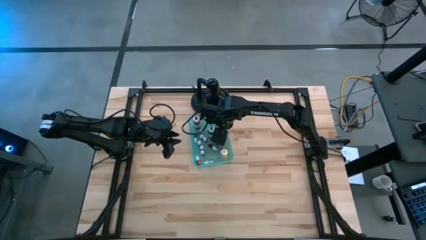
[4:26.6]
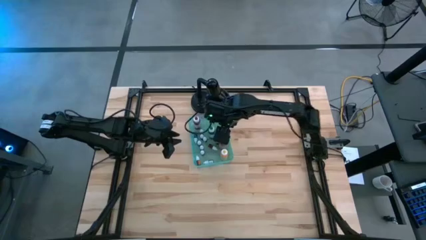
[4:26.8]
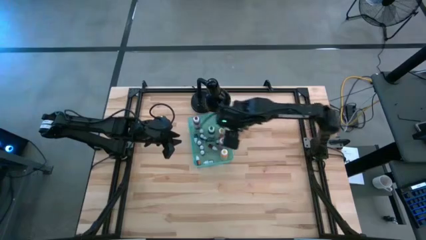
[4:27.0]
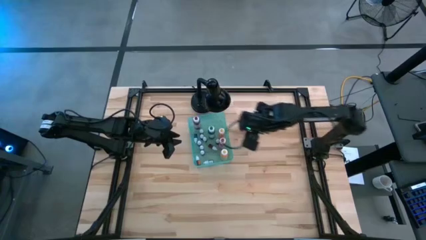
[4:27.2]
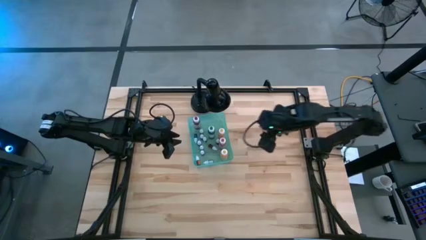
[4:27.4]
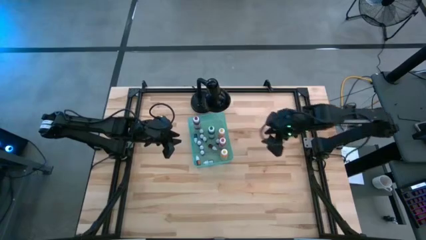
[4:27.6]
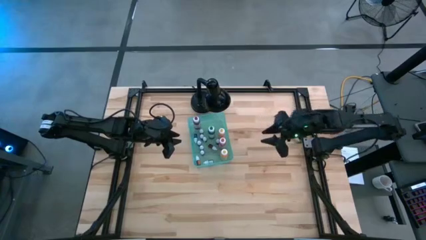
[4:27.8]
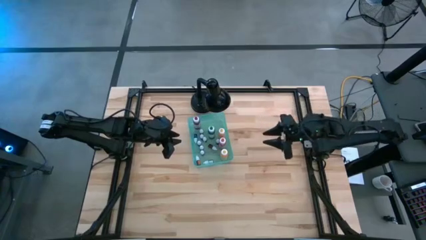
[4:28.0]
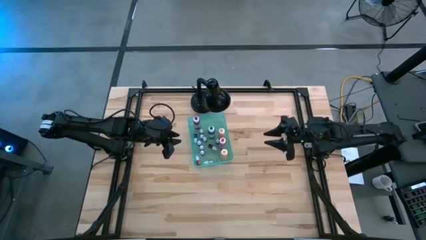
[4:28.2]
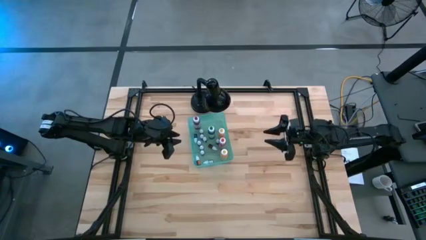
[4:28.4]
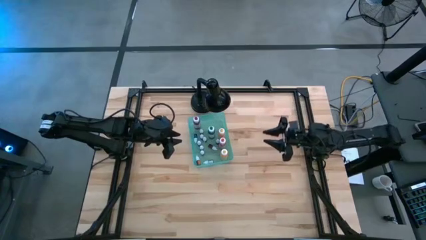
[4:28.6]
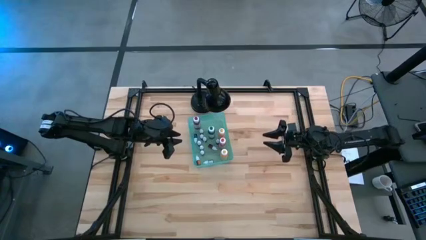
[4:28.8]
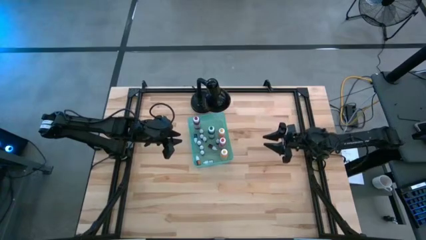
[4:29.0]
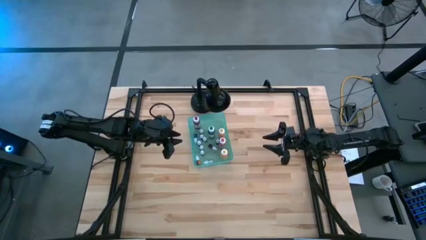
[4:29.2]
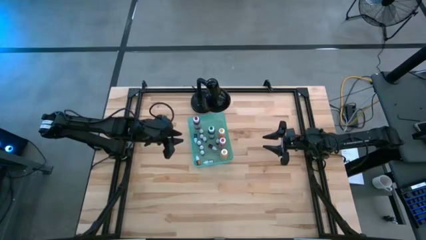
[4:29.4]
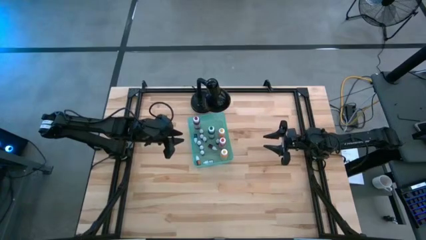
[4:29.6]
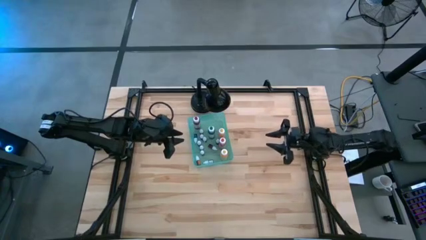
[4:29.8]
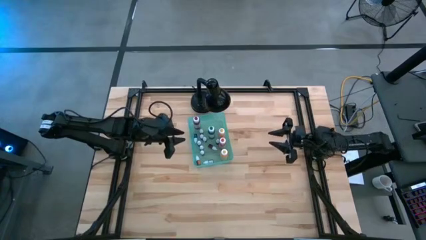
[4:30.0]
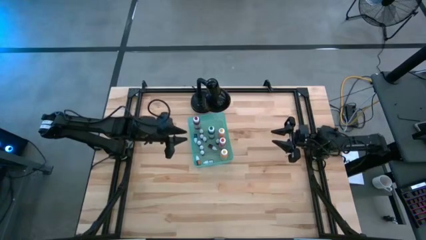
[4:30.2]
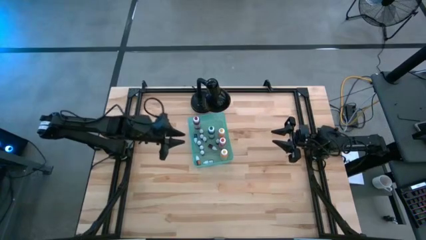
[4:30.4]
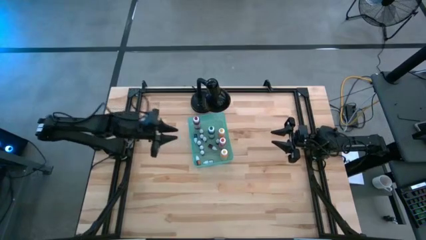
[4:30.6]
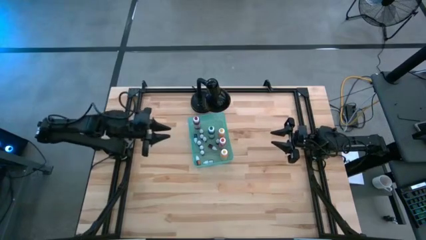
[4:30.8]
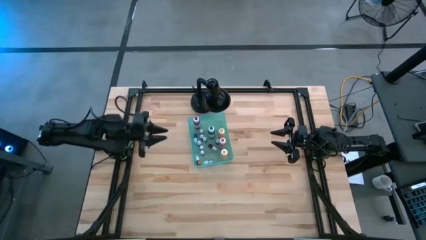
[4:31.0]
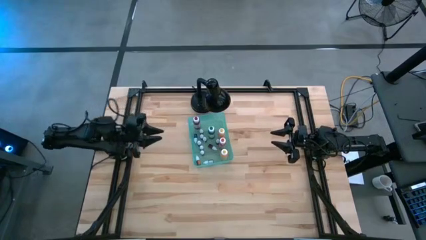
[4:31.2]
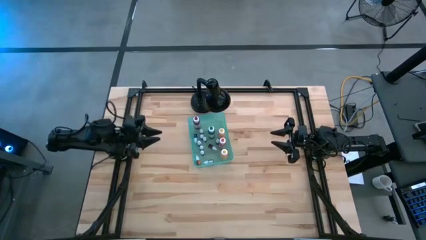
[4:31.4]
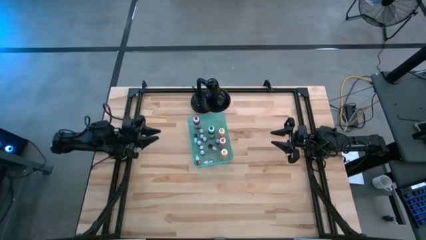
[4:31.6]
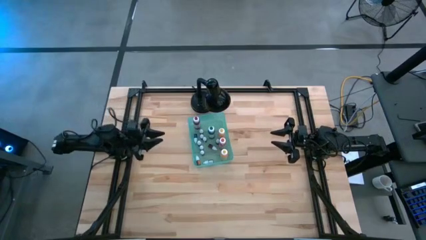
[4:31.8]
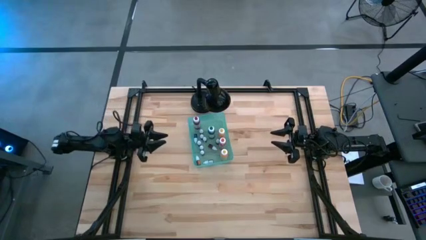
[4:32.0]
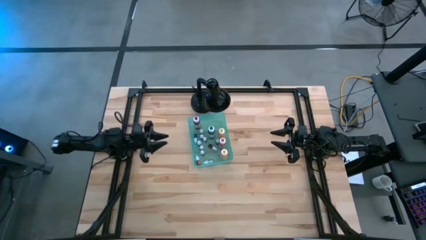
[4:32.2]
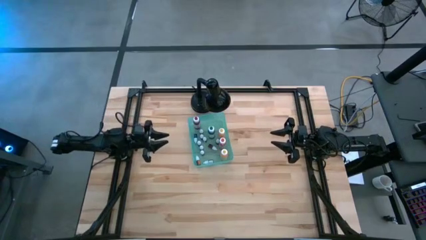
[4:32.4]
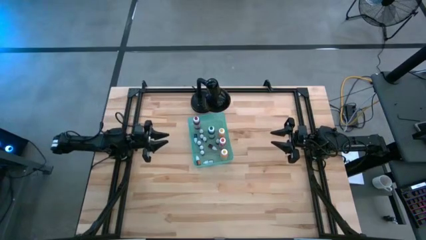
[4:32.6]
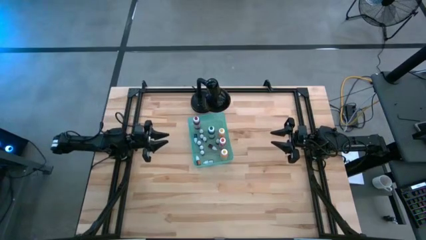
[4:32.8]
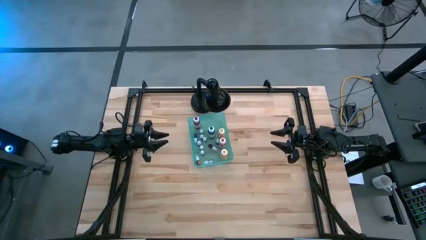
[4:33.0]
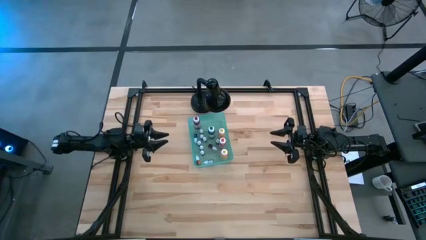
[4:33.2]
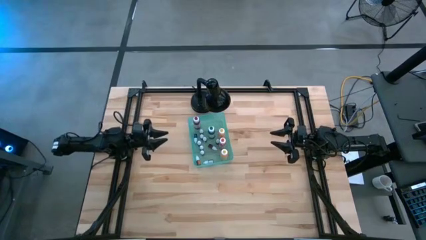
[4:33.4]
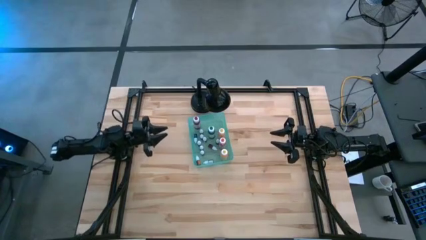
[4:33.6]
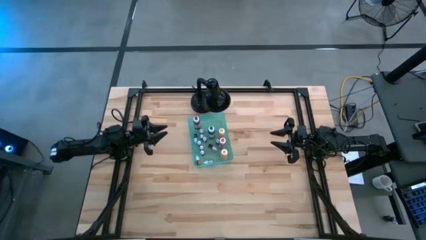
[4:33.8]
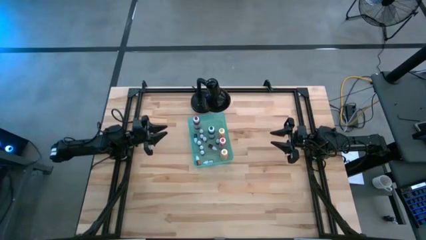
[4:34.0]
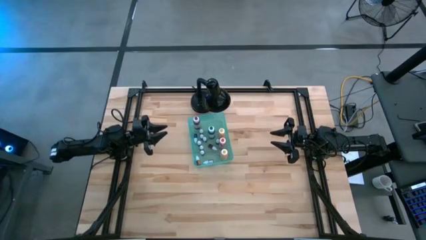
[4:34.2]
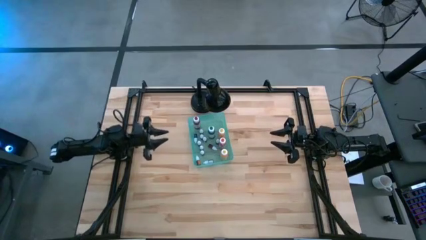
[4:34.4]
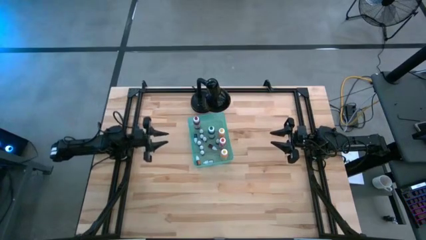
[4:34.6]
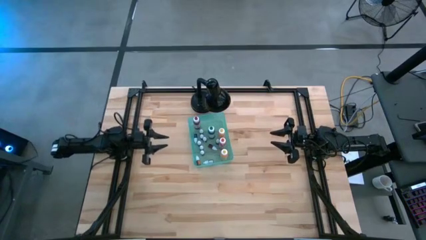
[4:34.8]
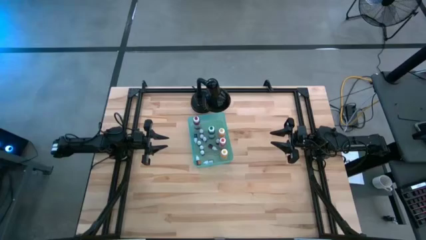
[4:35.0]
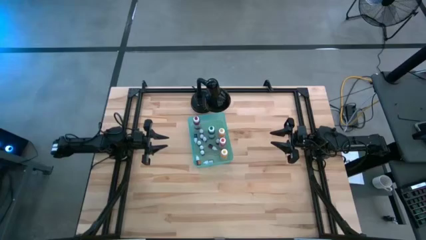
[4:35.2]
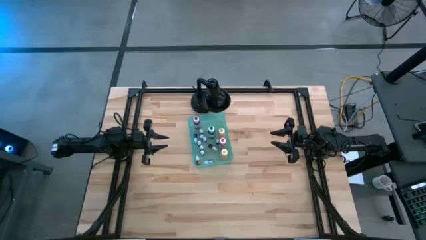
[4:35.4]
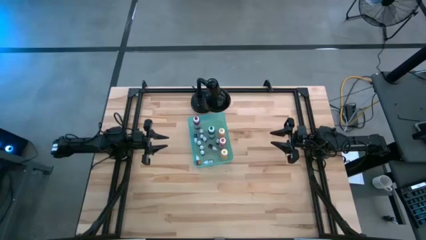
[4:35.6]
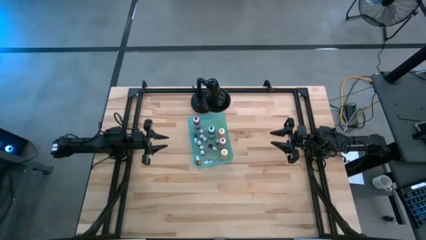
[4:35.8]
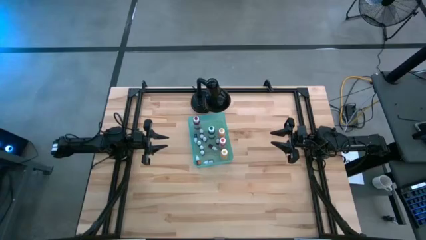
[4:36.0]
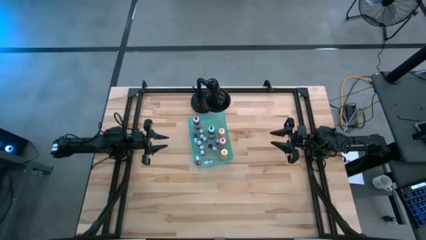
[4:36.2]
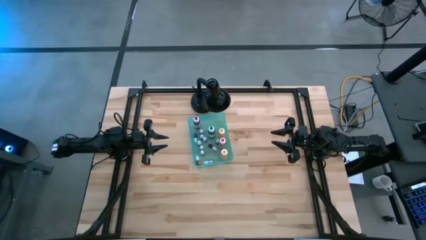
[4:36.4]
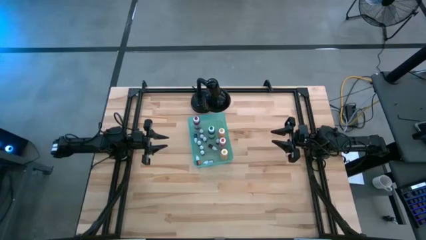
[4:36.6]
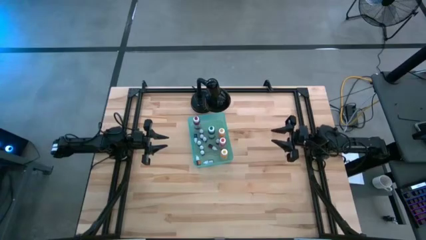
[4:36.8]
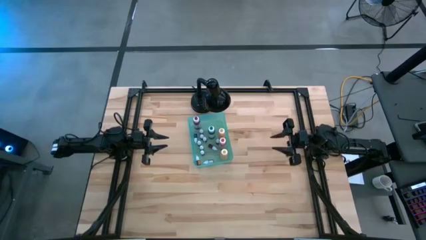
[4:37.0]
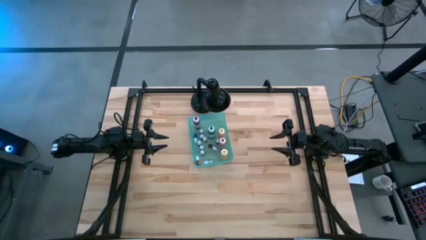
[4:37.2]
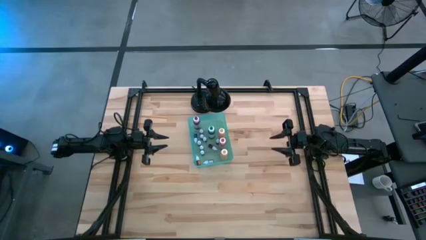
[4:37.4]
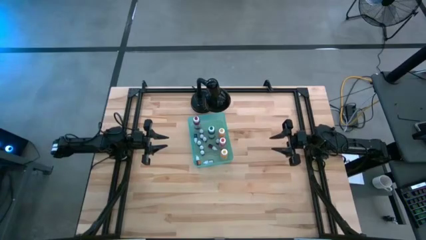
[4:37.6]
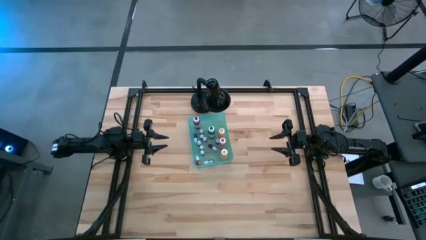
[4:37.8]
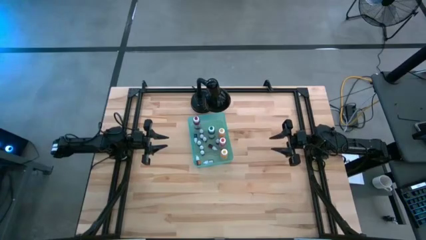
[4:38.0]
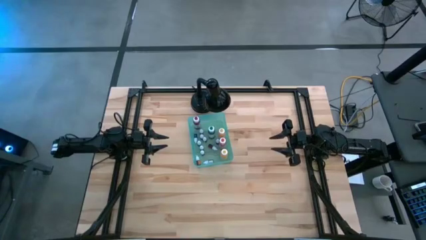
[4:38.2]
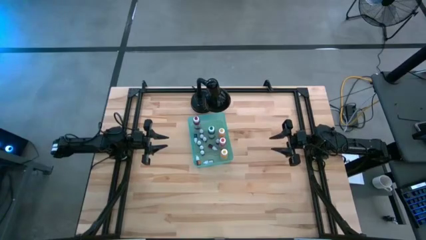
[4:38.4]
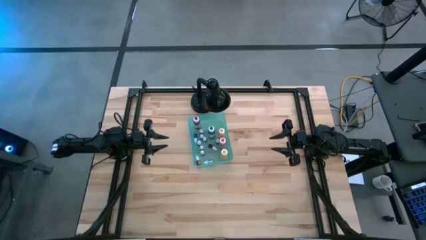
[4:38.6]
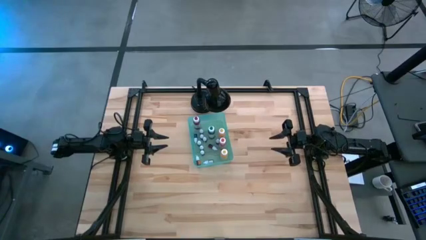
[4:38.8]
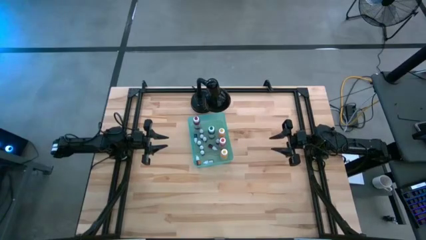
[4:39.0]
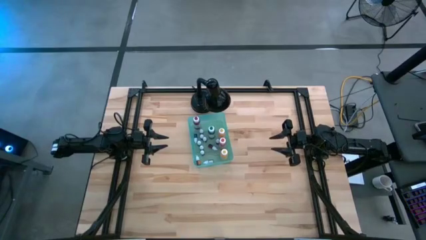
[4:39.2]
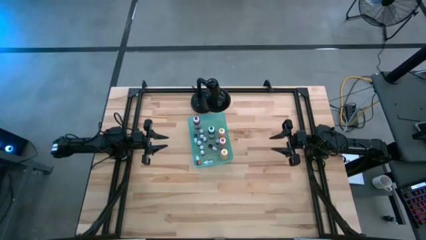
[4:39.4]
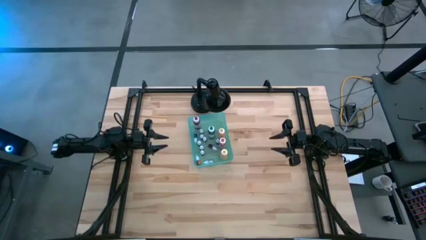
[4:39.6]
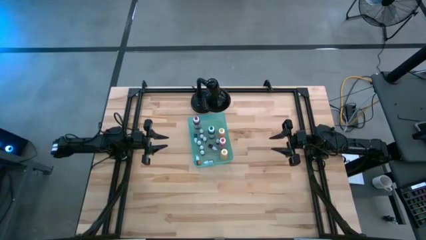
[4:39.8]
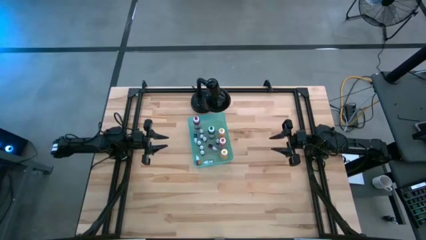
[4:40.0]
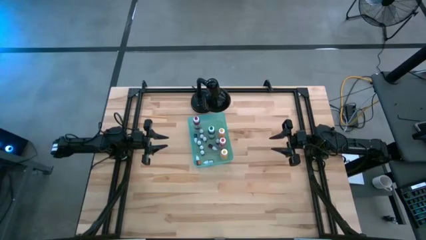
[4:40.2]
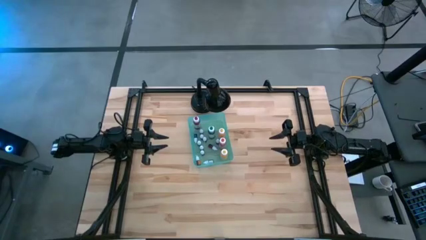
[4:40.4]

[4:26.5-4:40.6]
Task: Pick & Place food coloring
Return to Home Position

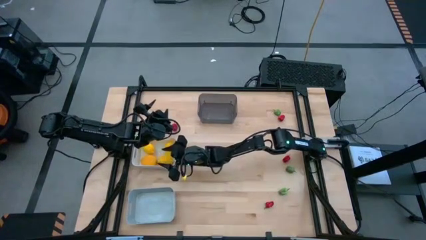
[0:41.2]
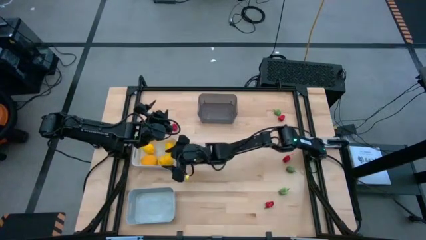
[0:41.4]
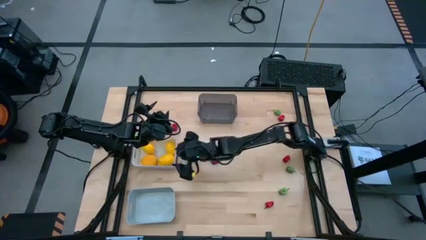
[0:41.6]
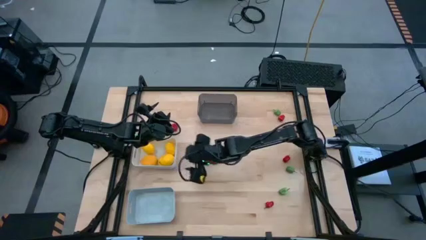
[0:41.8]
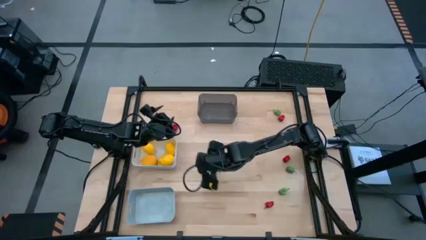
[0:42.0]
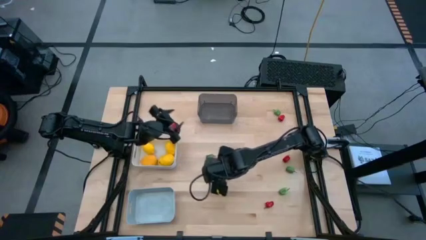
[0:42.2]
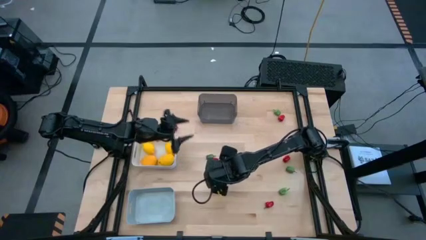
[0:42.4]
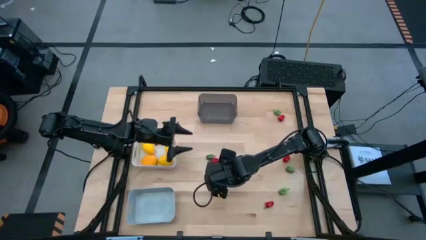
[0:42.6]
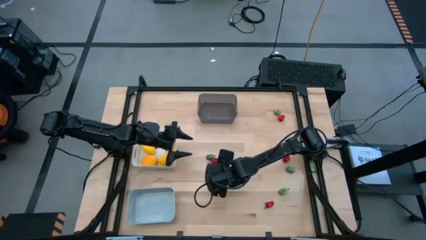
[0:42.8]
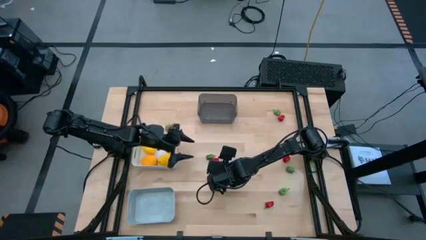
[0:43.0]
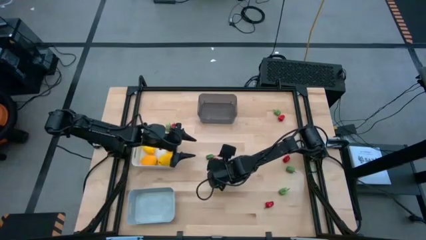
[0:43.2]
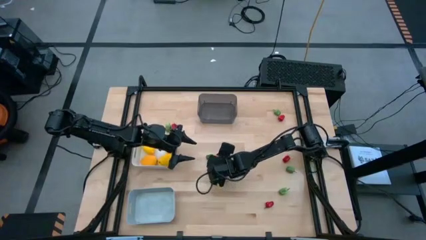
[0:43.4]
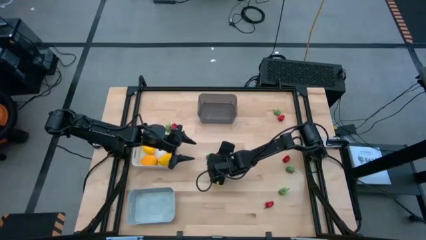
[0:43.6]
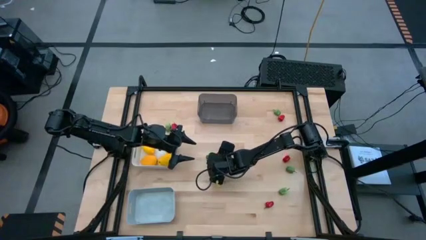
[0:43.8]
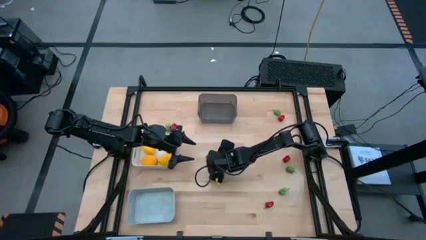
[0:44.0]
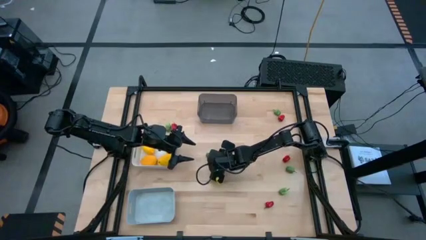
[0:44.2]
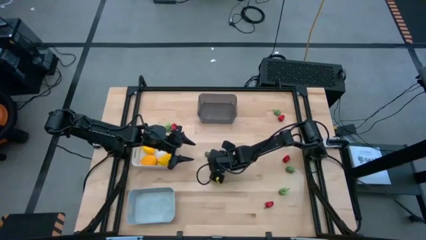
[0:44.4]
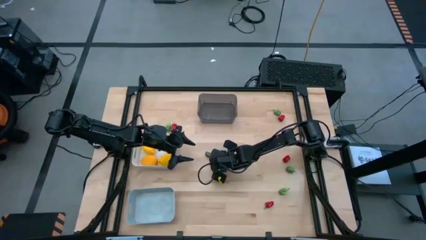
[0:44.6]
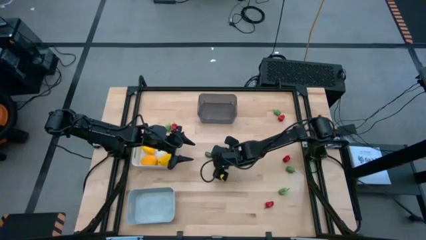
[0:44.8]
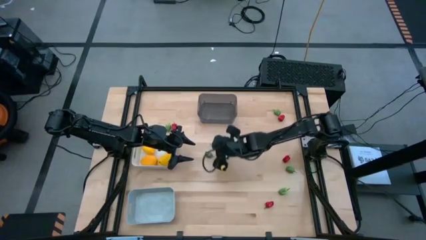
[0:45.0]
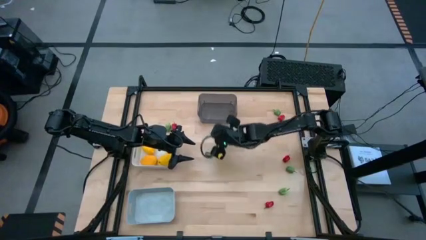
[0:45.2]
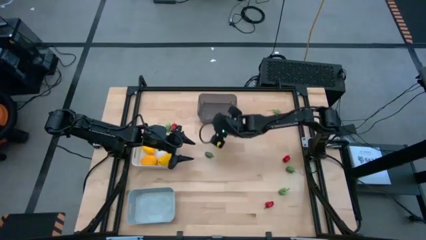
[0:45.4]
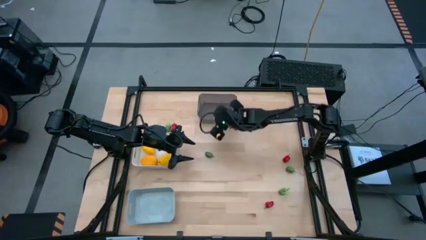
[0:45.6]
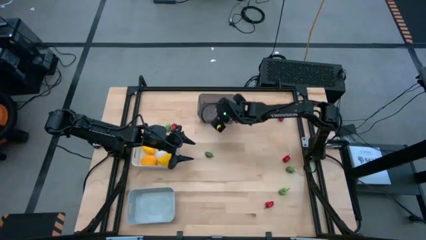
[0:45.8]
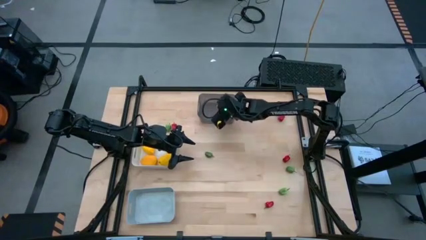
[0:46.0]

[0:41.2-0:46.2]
Task: Sort produce into baskets
Put the red chili pepper into the black transparent bin
